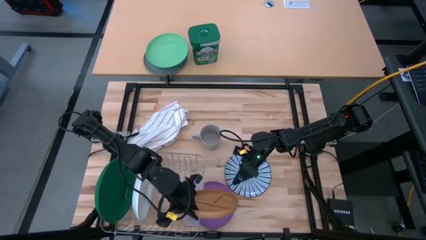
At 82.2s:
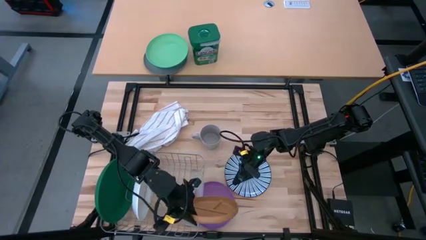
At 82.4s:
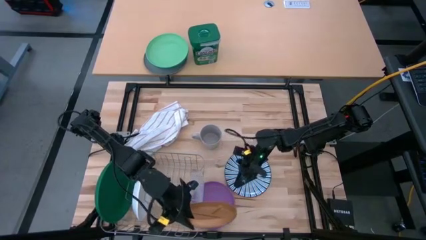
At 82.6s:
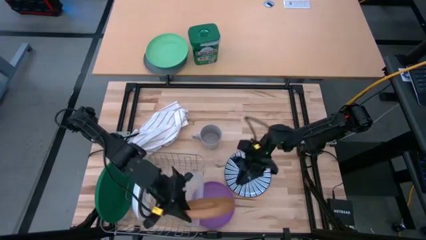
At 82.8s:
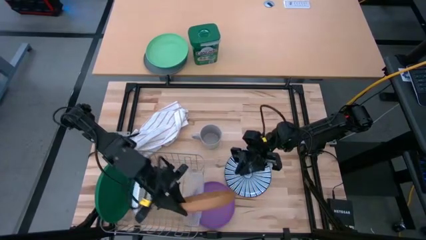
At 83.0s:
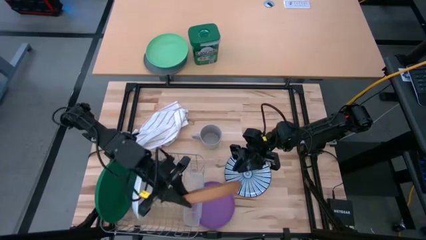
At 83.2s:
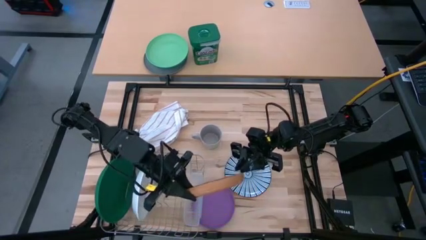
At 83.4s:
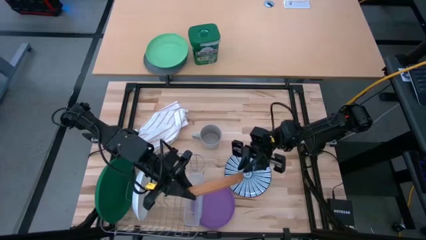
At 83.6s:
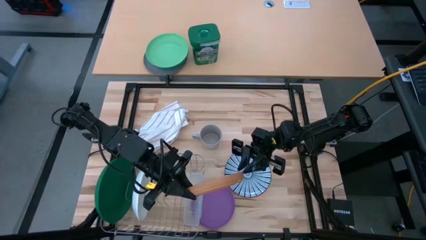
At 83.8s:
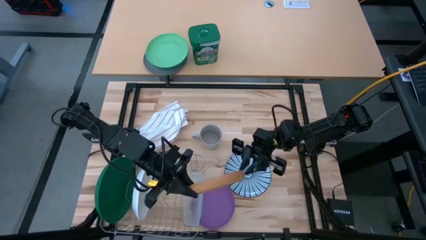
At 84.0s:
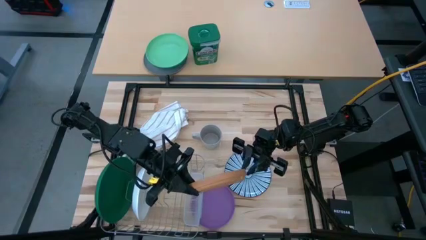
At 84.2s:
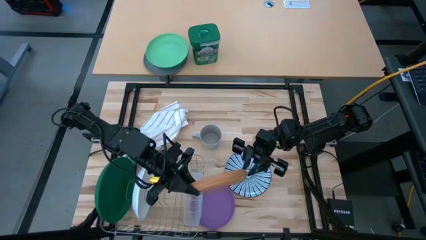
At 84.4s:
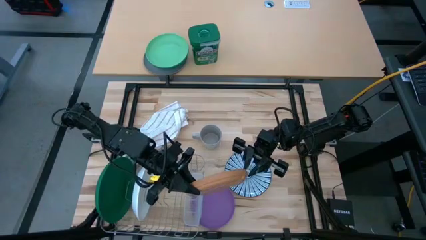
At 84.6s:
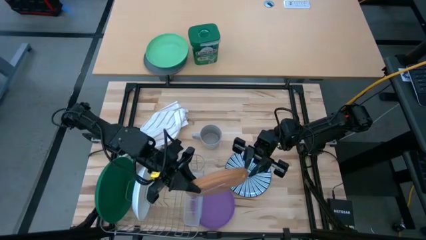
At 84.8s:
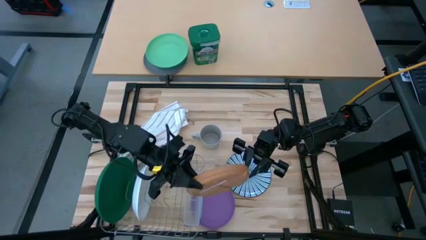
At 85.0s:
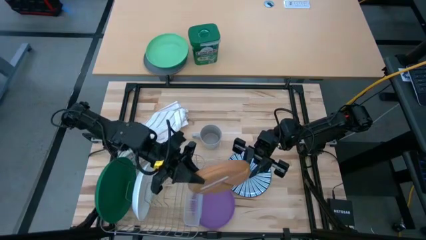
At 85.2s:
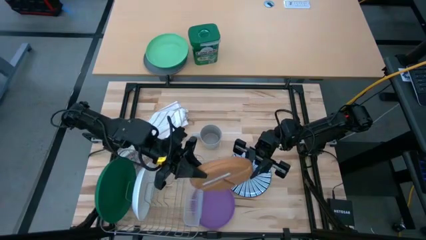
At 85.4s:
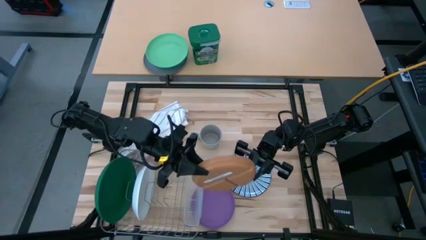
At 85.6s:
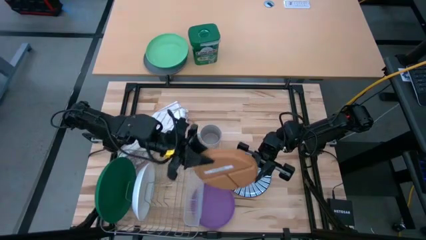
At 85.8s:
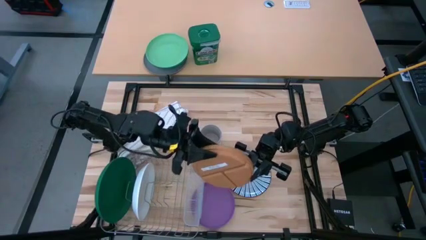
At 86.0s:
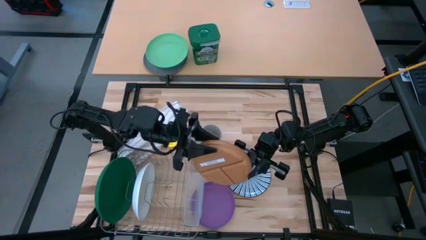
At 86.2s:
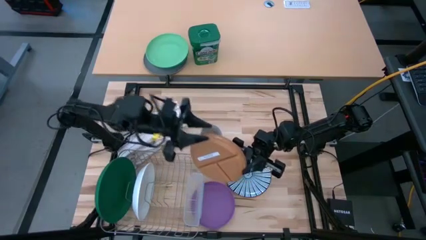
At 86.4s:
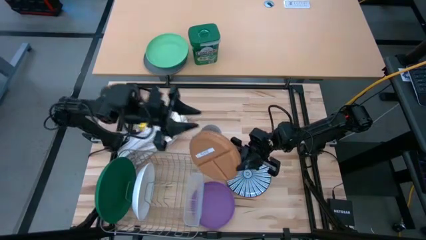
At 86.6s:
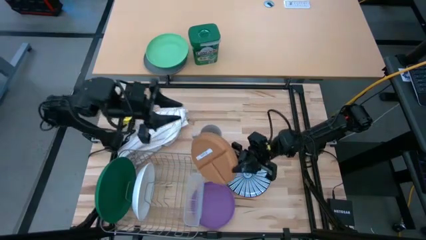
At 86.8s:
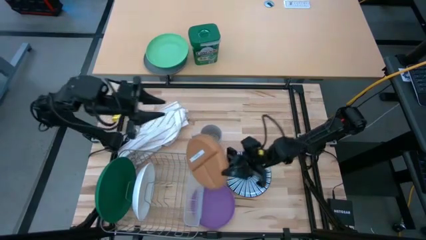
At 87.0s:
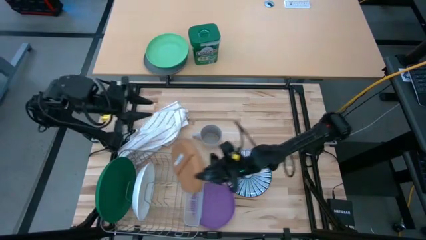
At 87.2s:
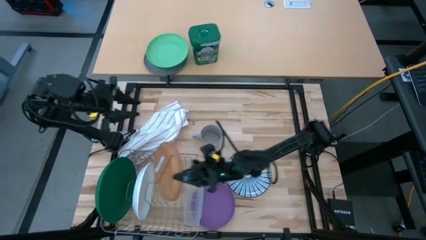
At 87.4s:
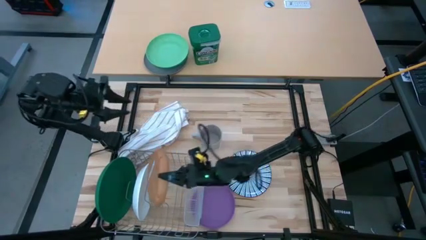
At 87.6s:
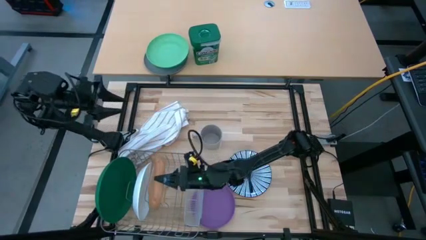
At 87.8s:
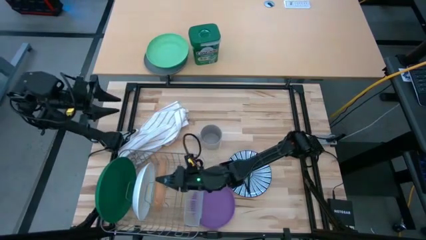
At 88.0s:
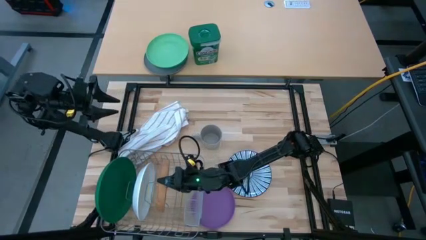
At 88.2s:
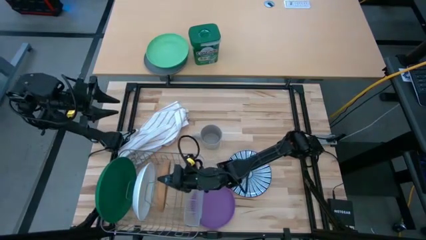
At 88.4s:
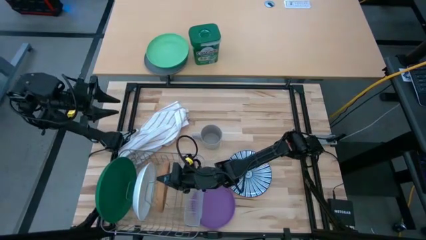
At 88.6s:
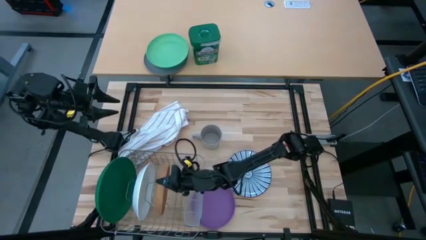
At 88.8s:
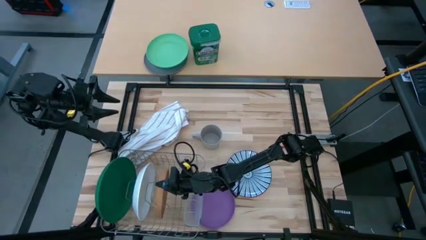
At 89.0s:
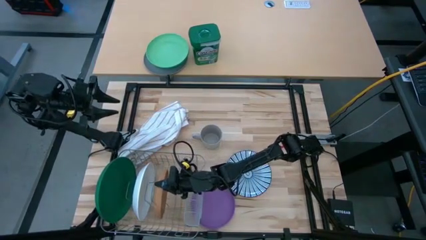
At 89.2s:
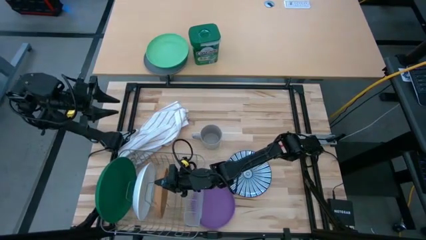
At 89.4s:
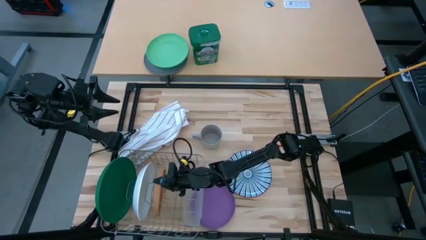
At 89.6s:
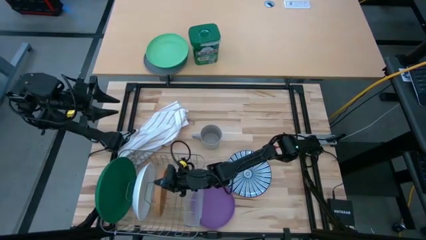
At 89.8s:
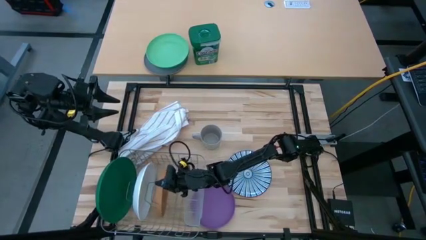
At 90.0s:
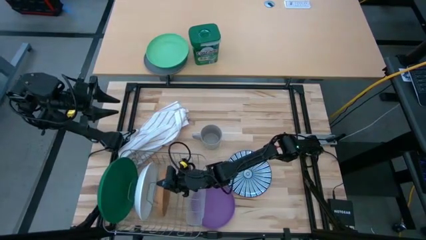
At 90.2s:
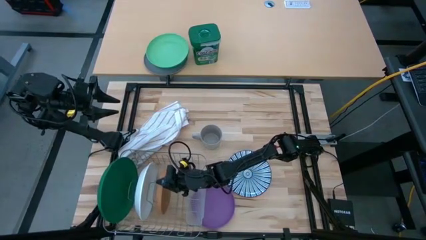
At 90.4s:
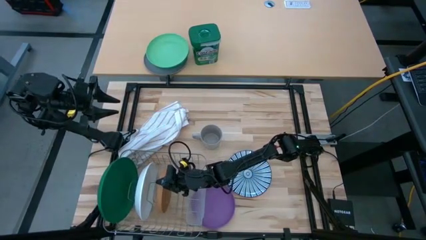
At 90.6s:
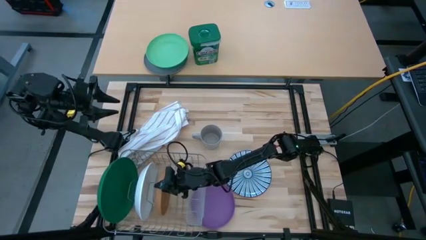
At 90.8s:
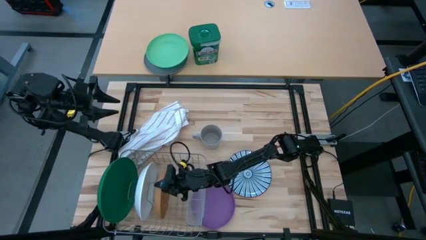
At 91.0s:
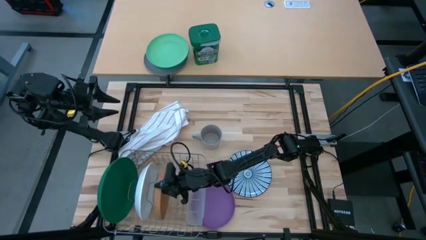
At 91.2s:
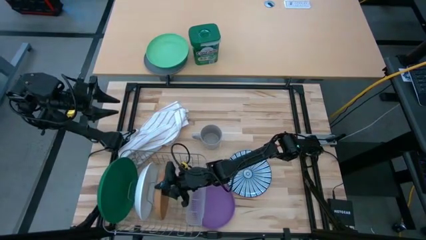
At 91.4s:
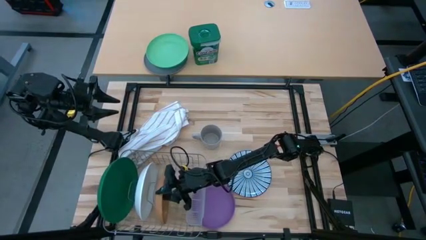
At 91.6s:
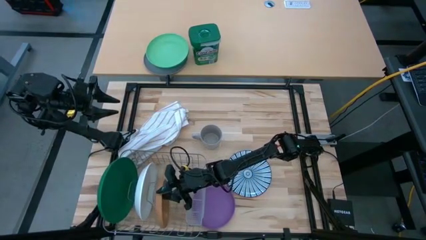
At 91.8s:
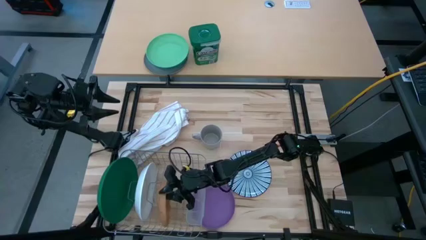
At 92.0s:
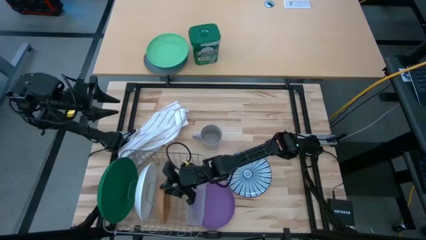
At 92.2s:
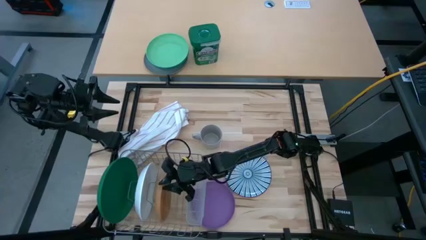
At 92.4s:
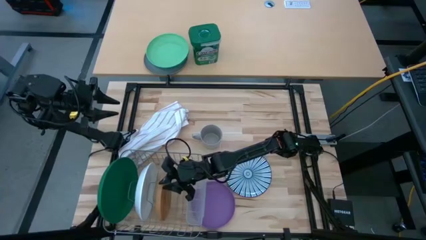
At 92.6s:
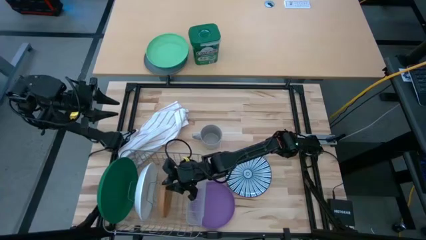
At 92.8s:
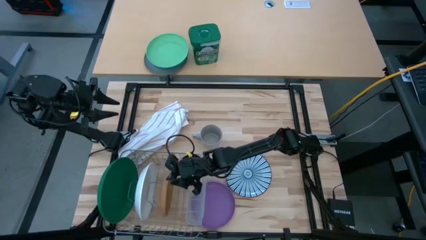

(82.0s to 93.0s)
Task: Sort dishes
Put the brown plate into the dish rack
